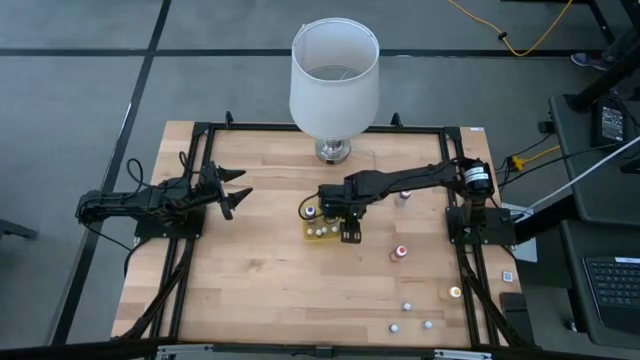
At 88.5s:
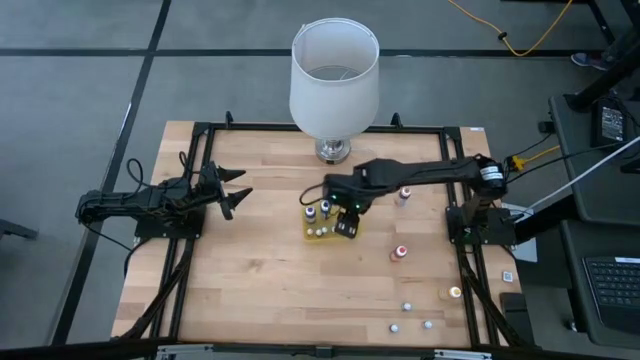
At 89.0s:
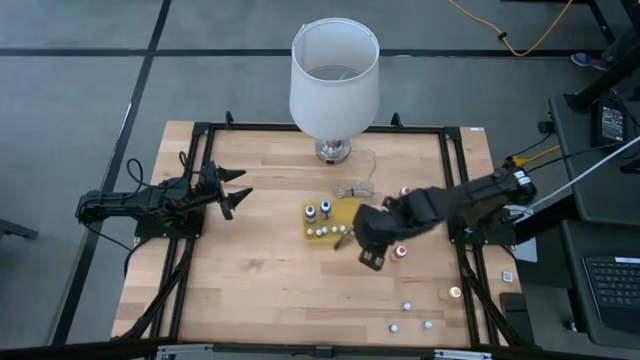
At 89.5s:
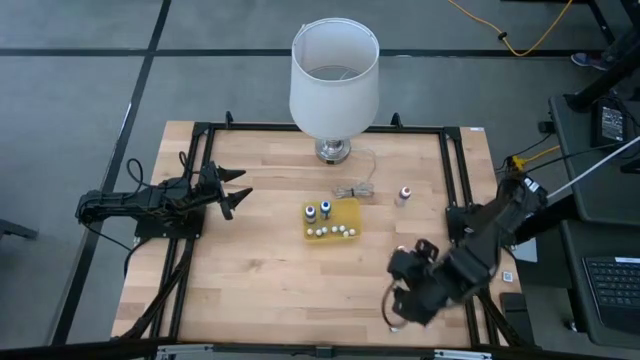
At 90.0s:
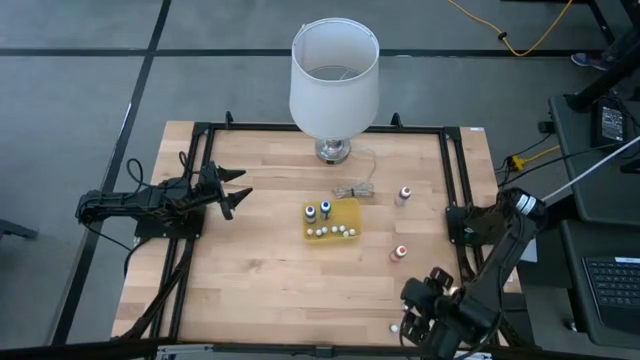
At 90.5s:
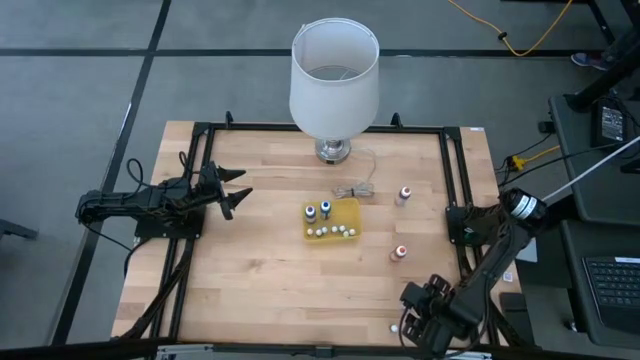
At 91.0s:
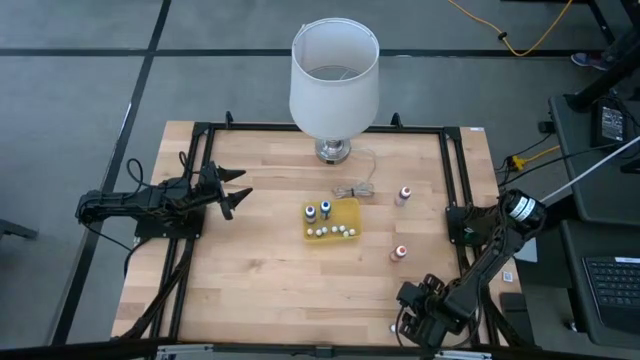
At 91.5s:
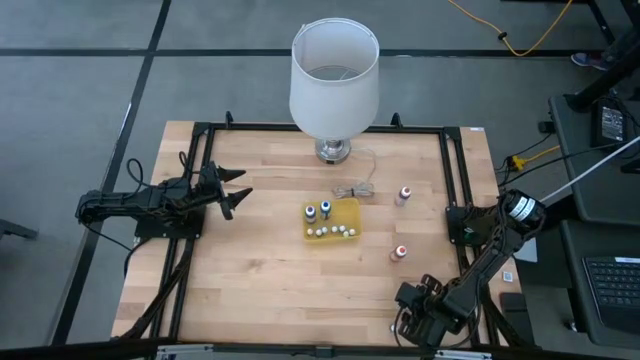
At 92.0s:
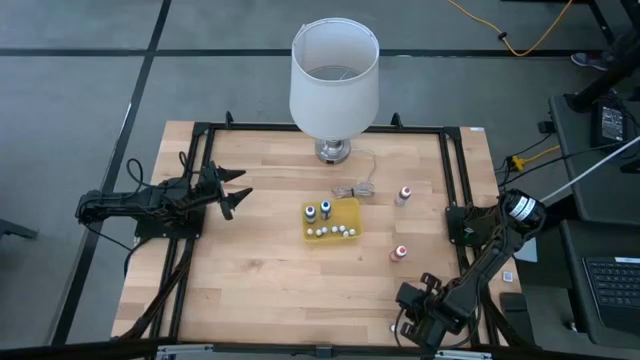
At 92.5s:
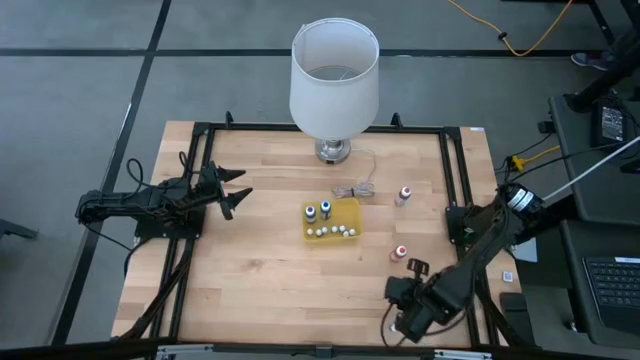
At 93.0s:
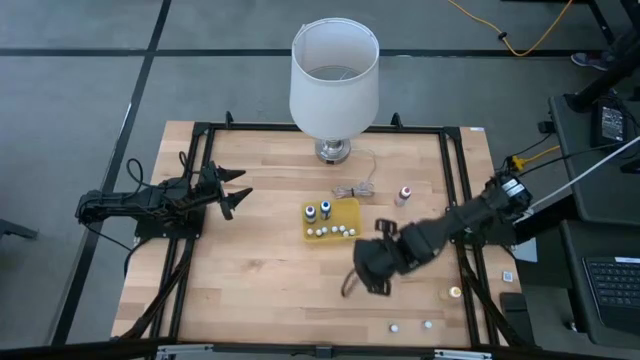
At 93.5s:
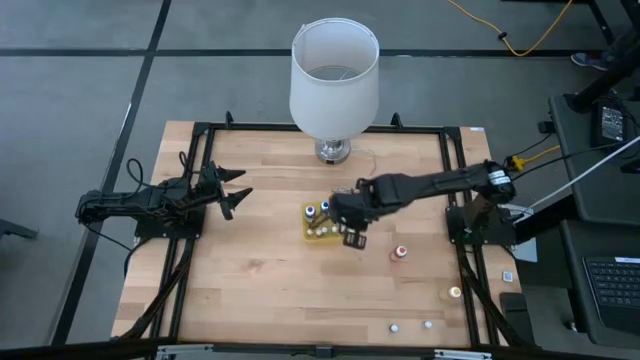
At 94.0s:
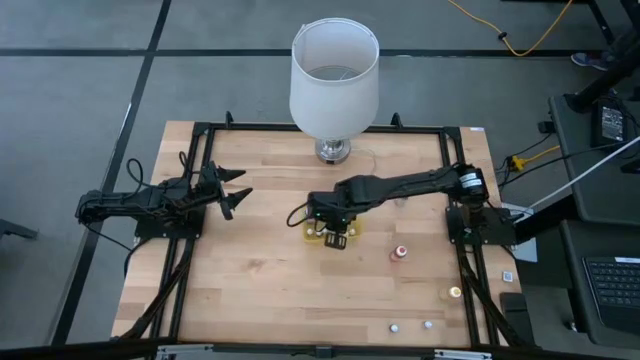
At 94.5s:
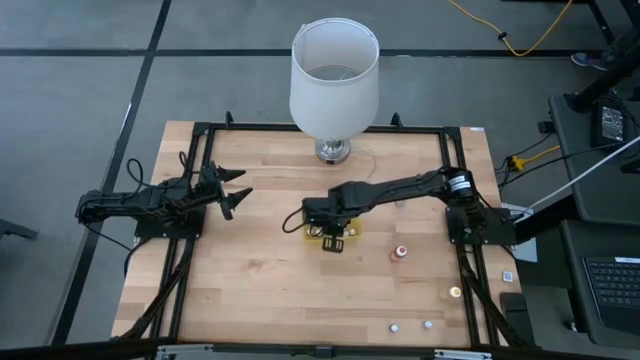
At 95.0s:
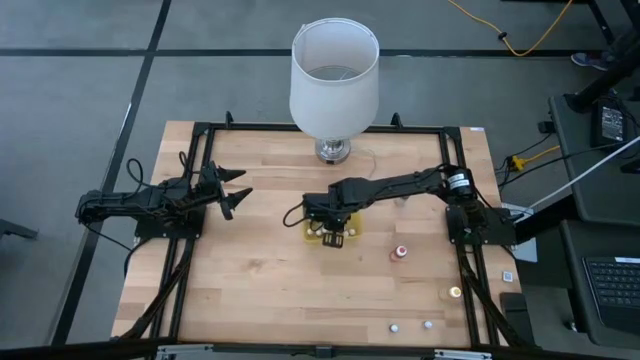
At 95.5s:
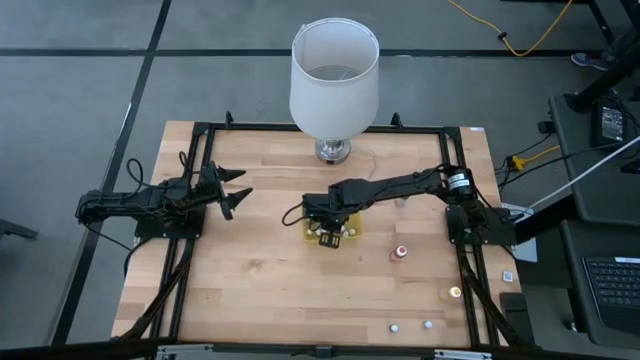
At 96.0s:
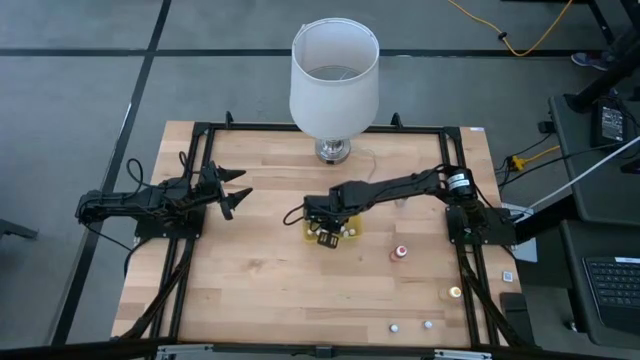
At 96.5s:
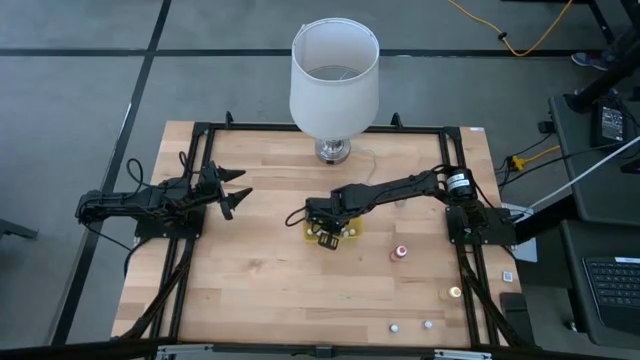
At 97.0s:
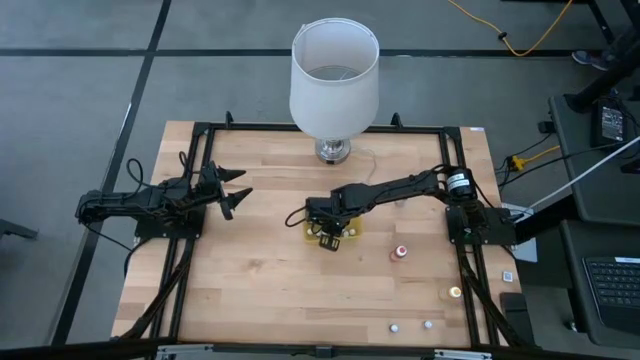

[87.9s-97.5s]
Task: Pick & Place food coloring
Put the small dark green food coloring bottle into the yellow bin

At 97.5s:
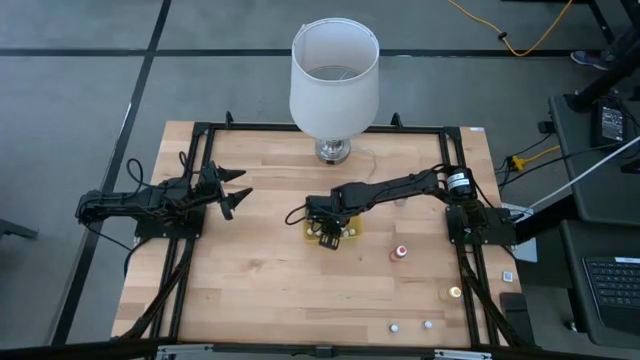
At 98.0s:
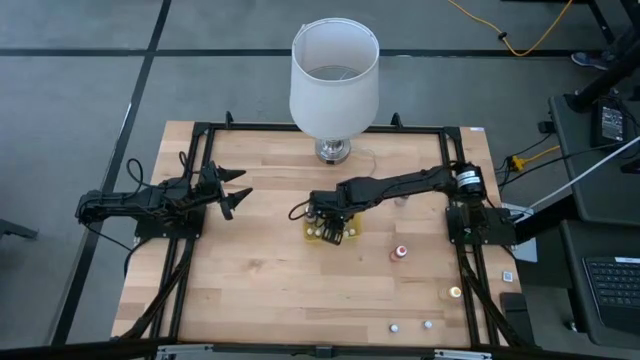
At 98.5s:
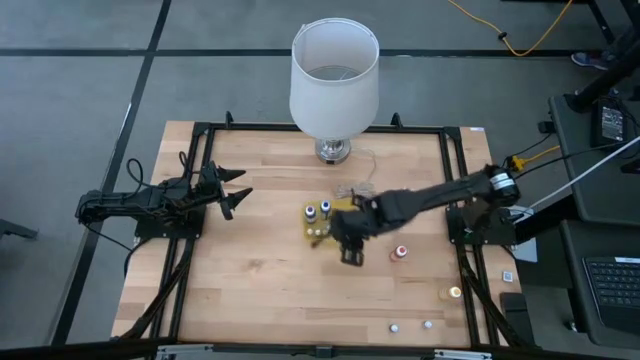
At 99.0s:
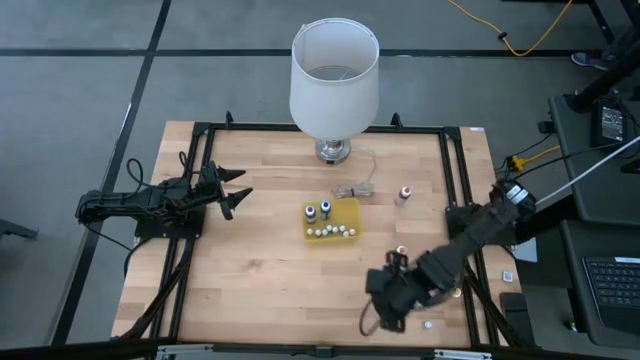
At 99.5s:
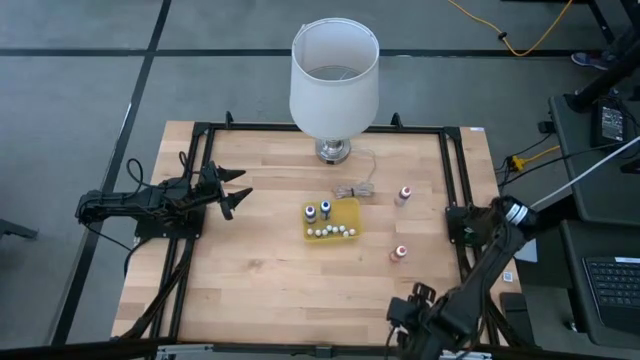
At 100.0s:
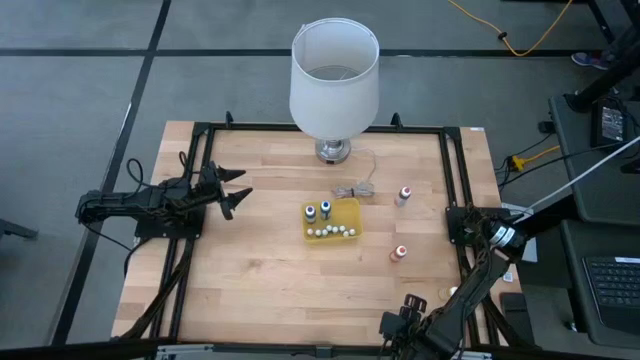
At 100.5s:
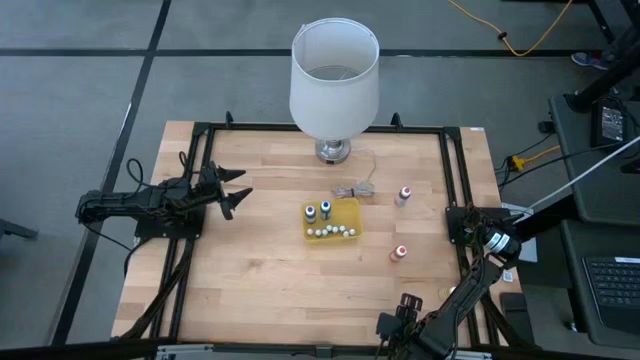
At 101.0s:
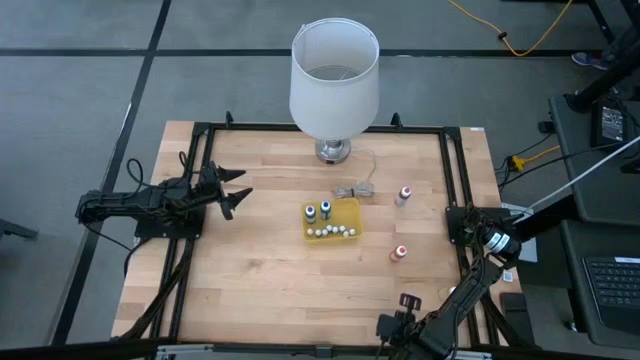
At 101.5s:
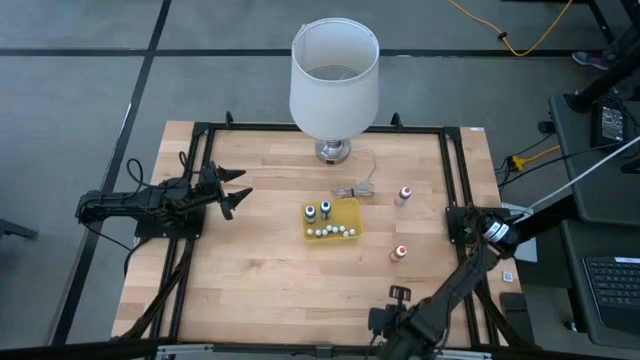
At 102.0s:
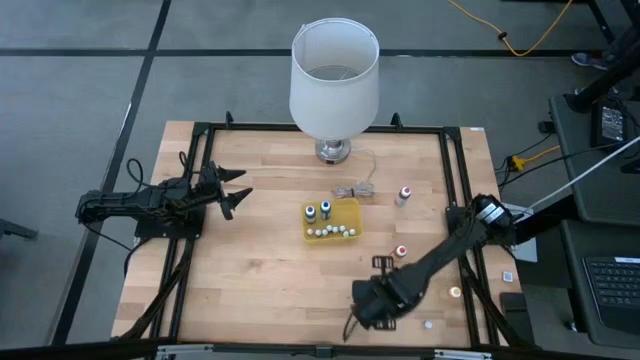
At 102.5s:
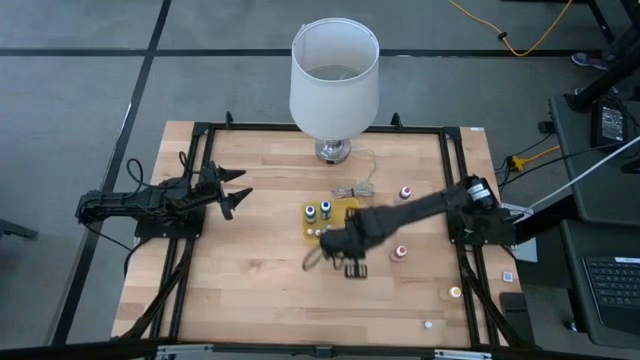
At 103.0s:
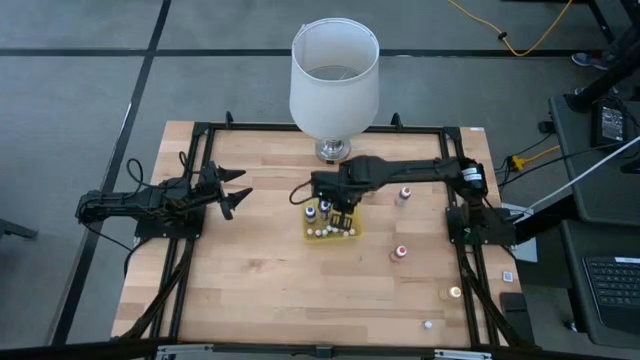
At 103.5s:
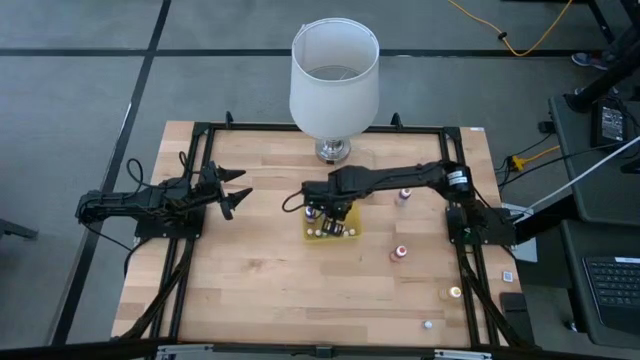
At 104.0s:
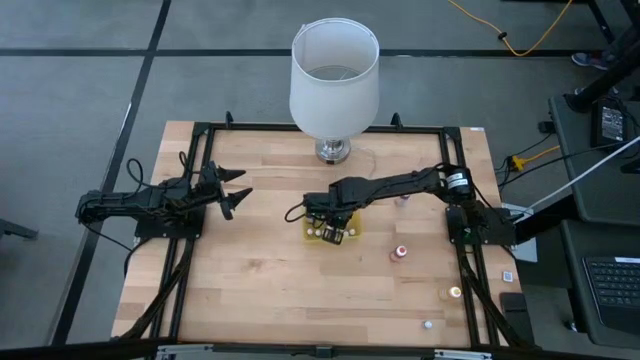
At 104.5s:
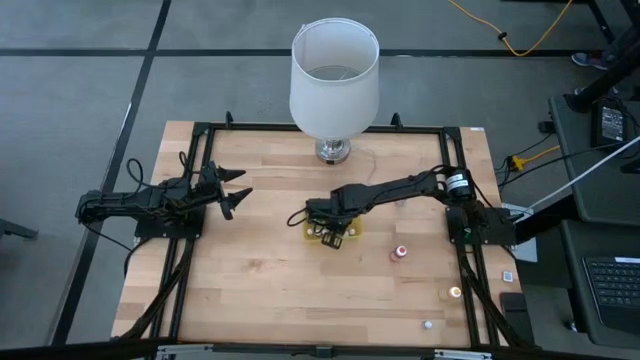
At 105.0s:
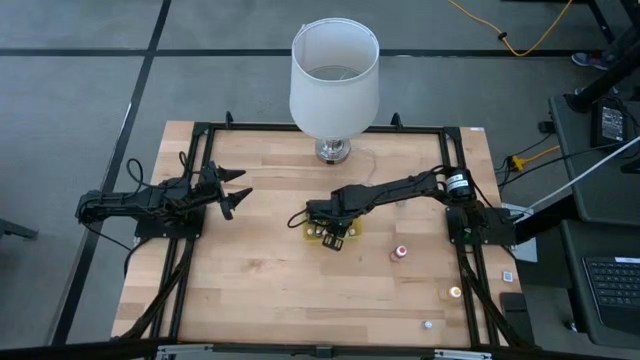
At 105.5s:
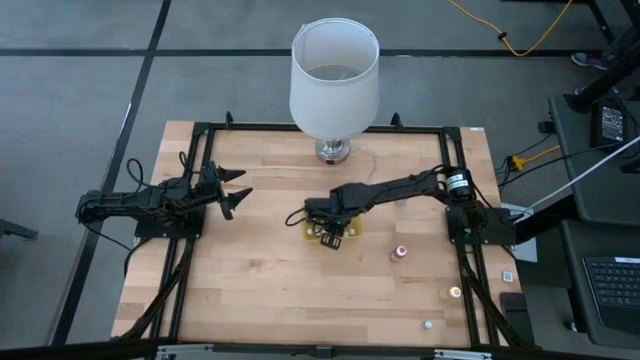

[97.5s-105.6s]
Put the small green food coloring bottle into the yellow bin

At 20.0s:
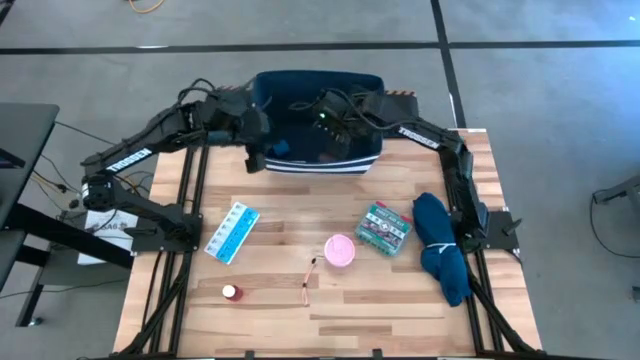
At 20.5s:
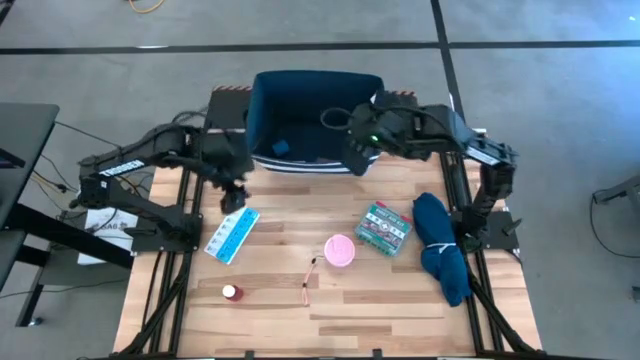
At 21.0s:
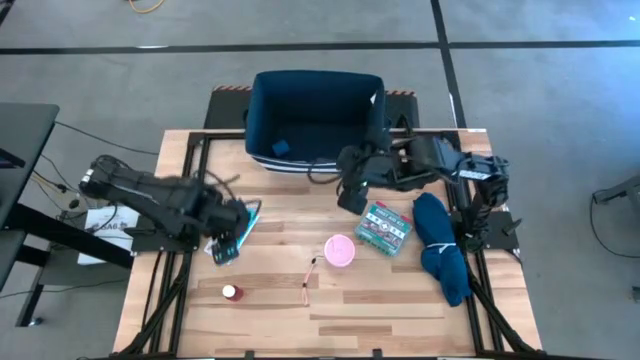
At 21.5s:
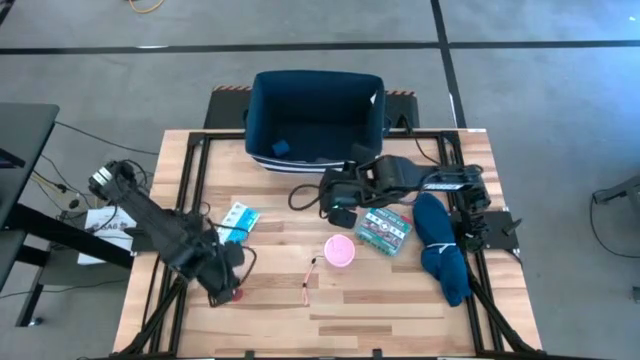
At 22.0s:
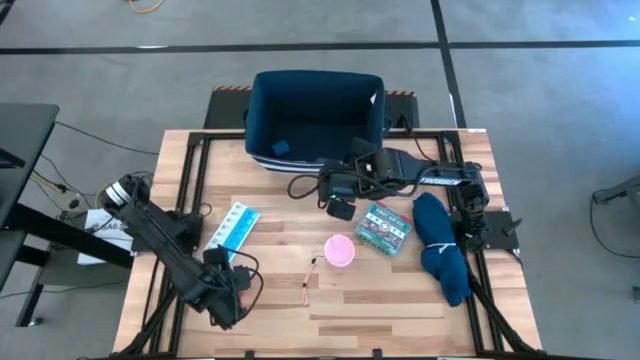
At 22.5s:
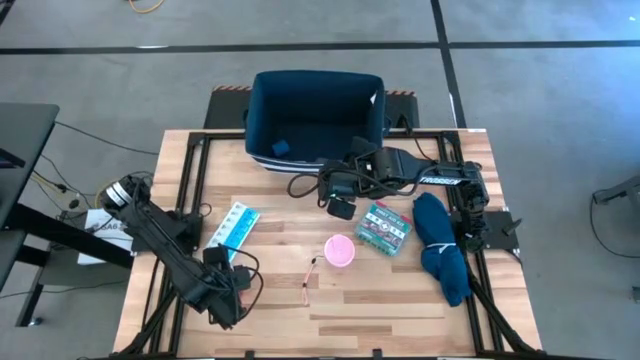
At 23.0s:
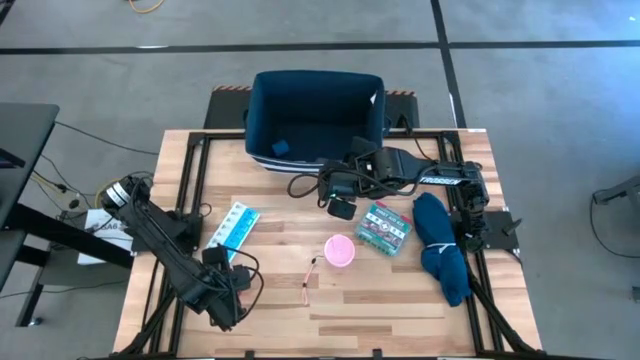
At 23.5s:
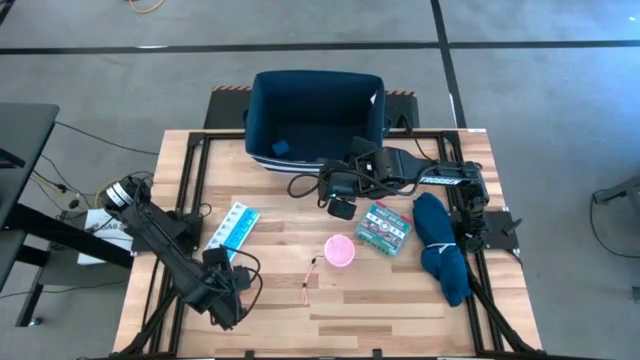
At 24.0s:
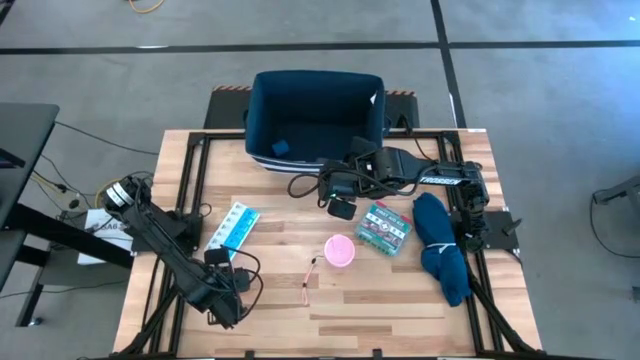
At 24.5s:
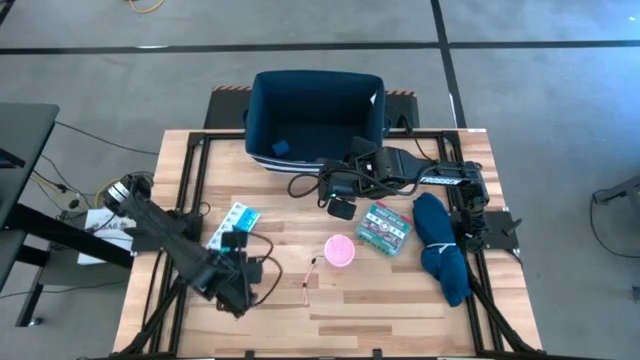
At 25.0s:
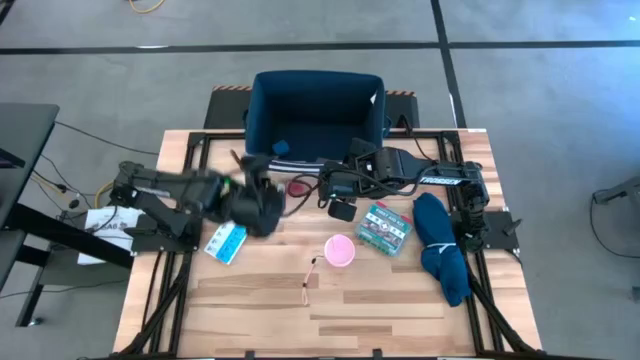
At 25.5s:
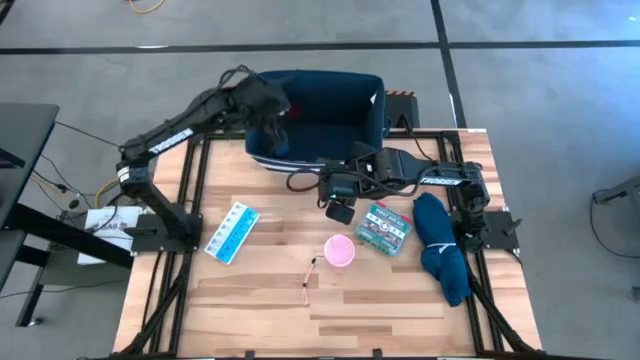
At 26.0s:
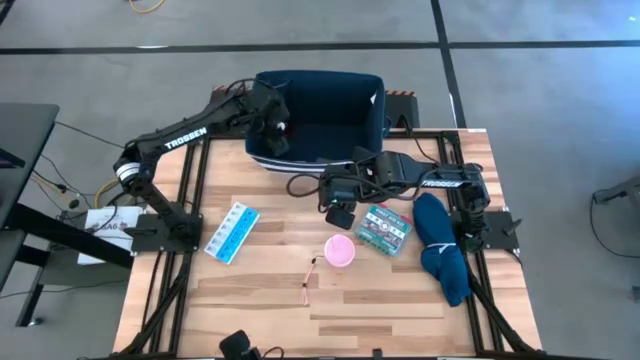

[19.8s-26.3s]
Task: Pick & place medical supplies in basket/bin
Put the red medicine bottle in the blue bin
